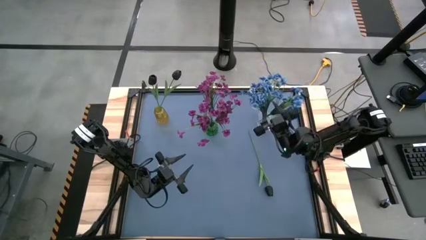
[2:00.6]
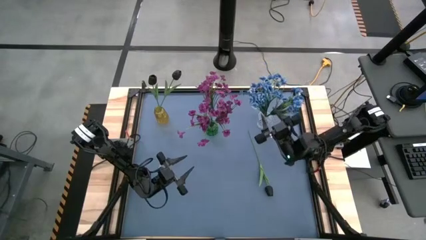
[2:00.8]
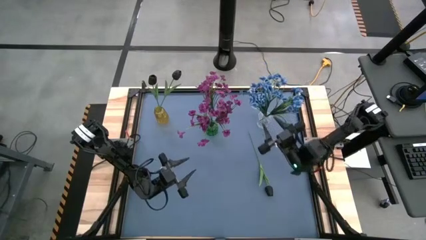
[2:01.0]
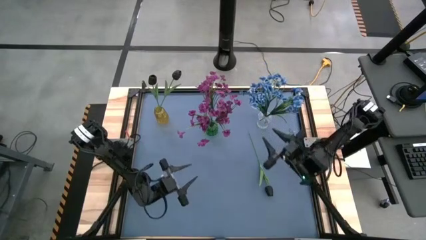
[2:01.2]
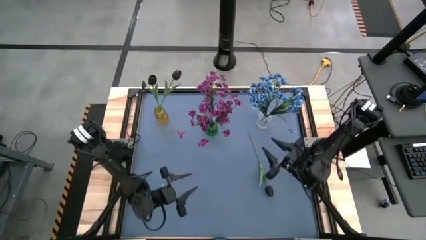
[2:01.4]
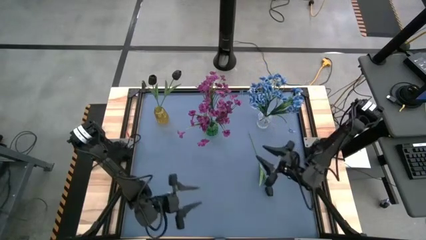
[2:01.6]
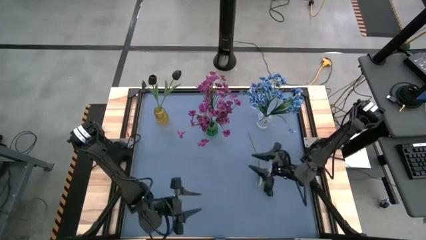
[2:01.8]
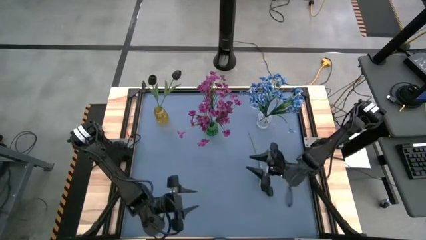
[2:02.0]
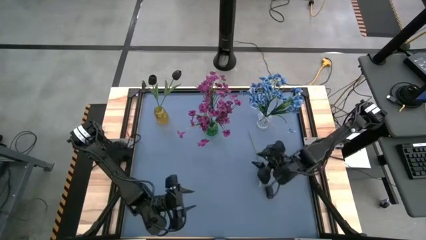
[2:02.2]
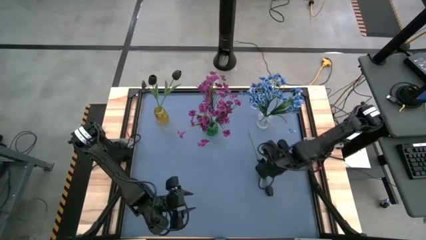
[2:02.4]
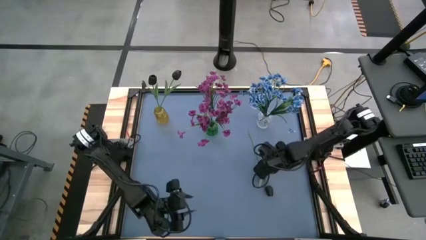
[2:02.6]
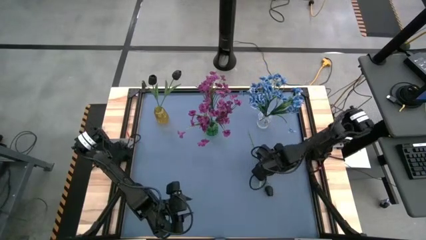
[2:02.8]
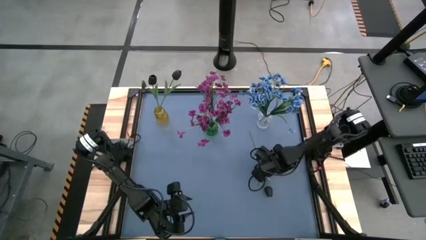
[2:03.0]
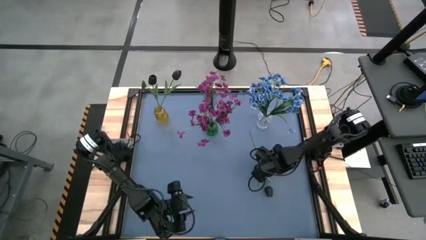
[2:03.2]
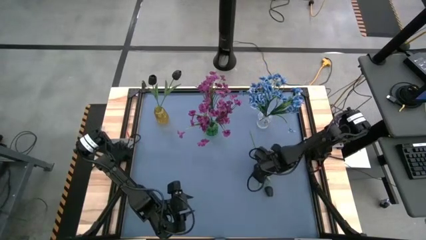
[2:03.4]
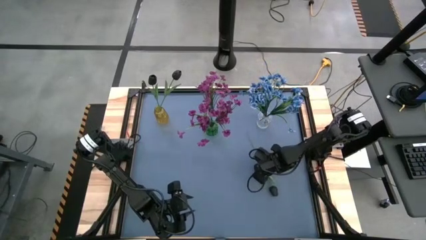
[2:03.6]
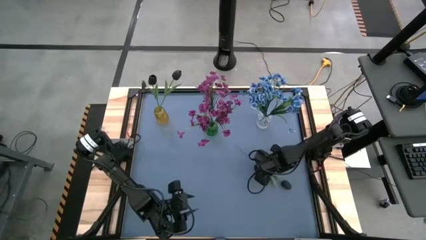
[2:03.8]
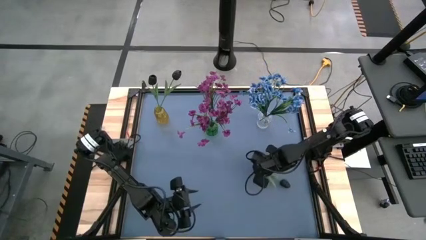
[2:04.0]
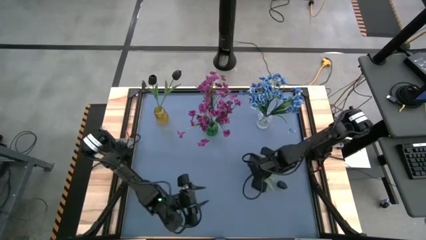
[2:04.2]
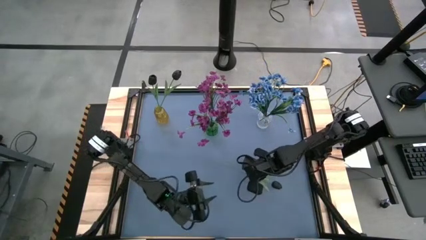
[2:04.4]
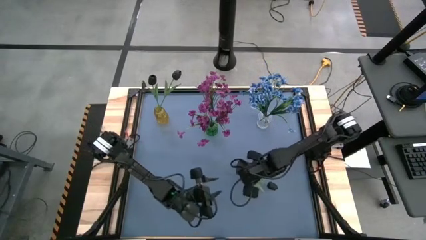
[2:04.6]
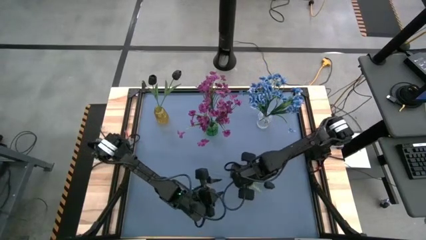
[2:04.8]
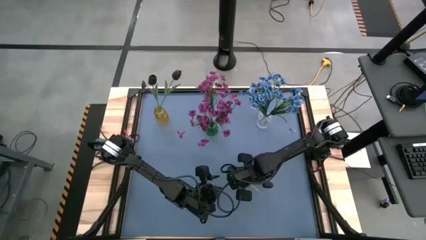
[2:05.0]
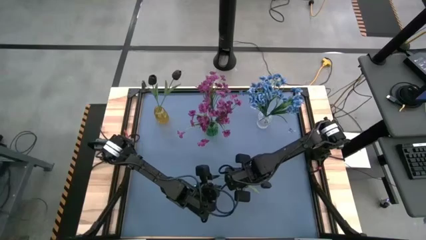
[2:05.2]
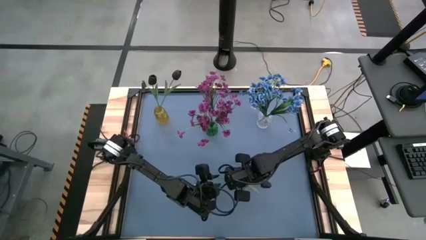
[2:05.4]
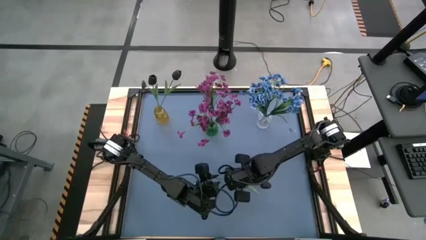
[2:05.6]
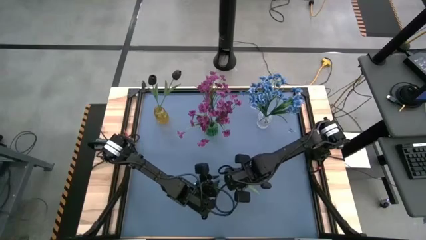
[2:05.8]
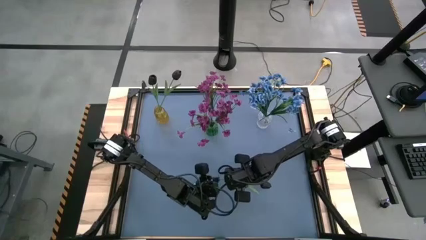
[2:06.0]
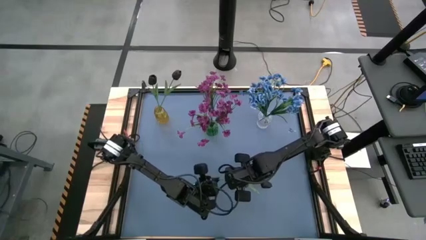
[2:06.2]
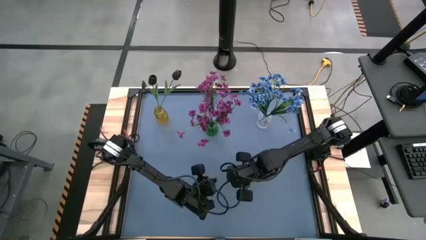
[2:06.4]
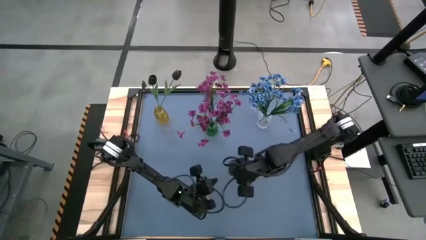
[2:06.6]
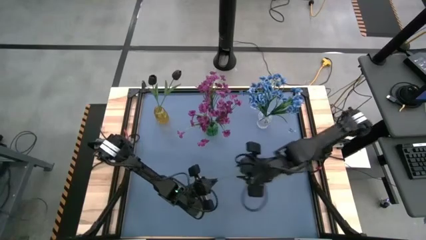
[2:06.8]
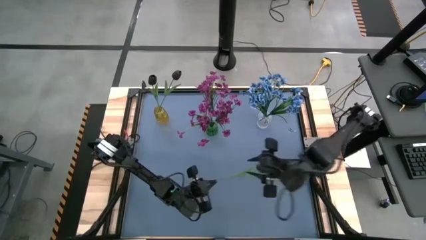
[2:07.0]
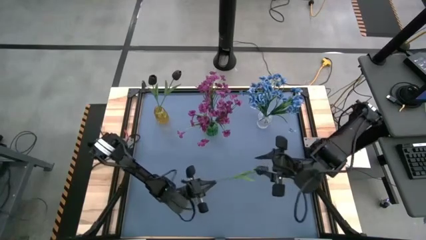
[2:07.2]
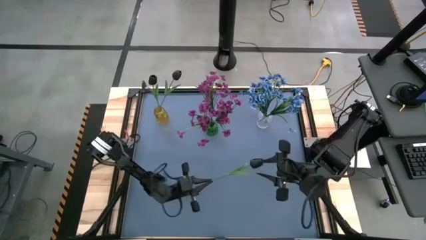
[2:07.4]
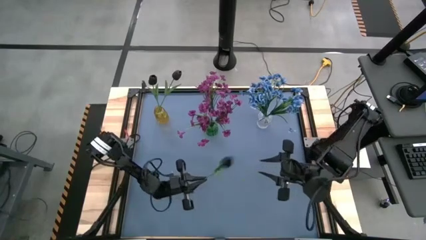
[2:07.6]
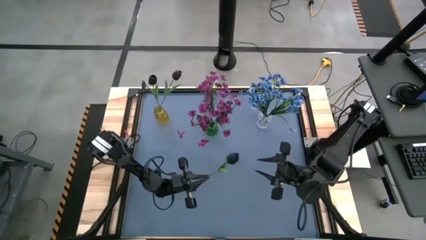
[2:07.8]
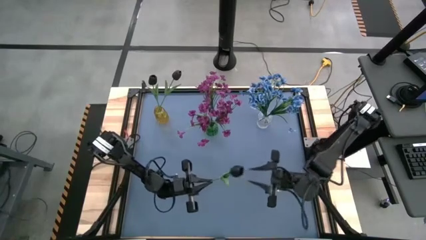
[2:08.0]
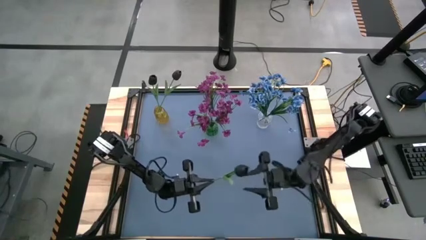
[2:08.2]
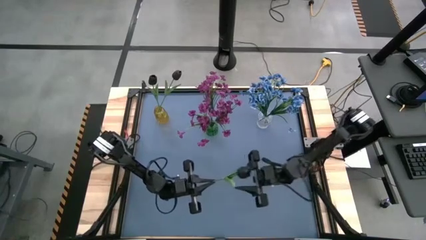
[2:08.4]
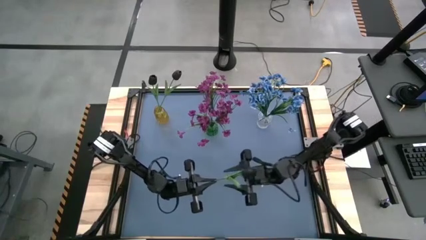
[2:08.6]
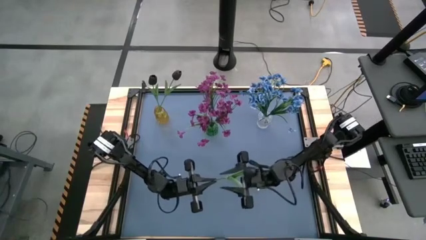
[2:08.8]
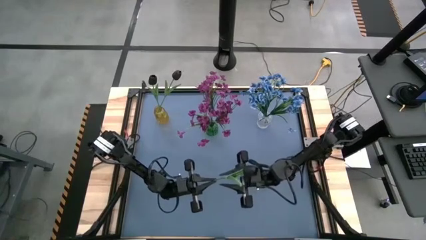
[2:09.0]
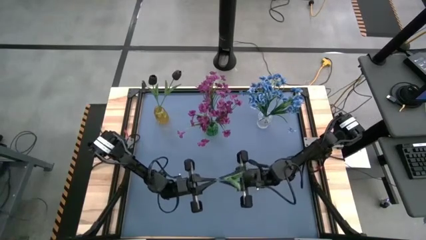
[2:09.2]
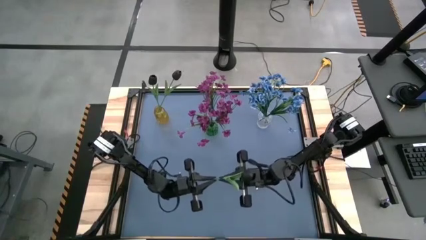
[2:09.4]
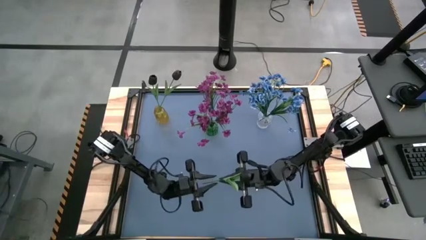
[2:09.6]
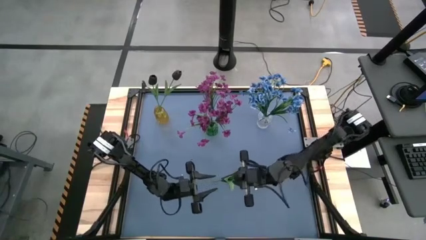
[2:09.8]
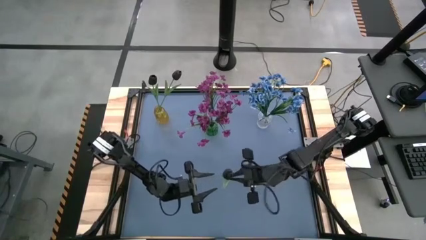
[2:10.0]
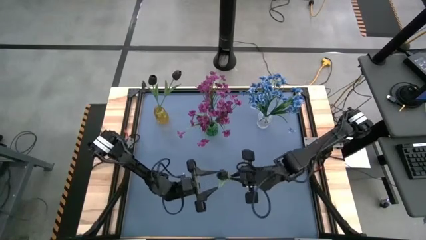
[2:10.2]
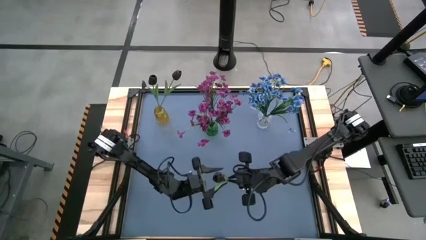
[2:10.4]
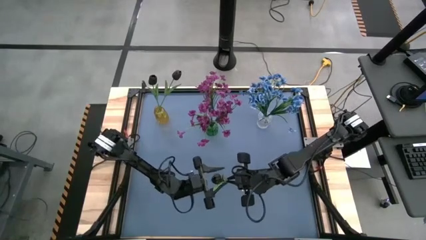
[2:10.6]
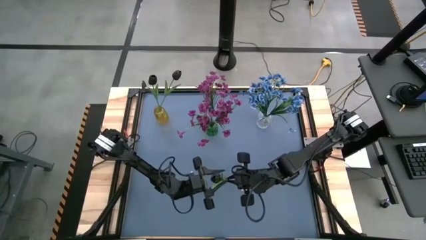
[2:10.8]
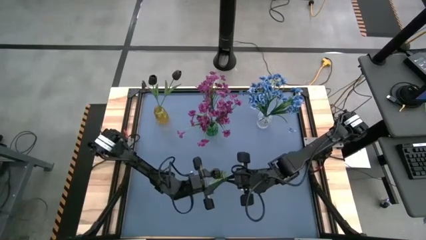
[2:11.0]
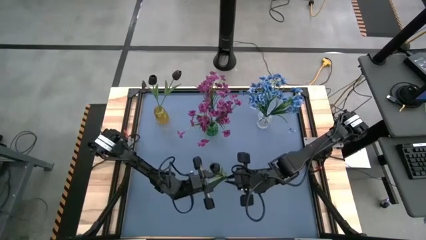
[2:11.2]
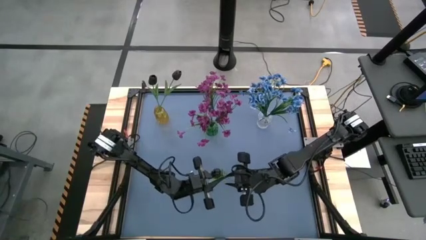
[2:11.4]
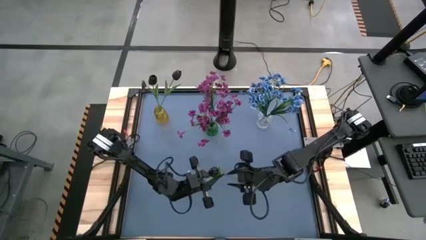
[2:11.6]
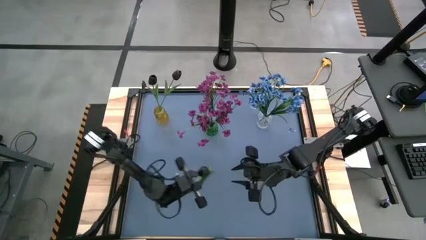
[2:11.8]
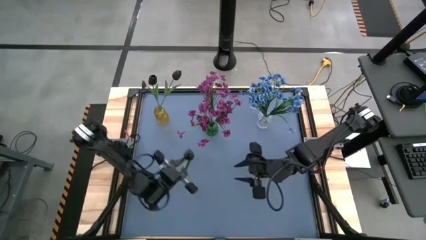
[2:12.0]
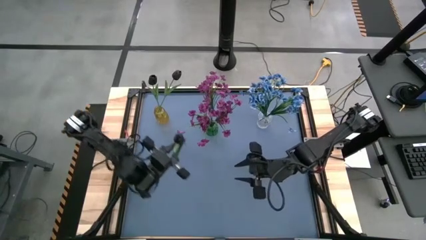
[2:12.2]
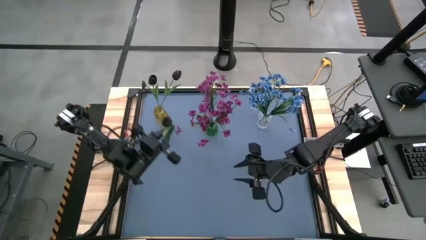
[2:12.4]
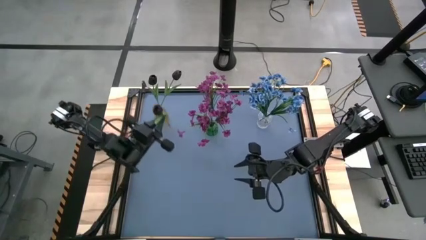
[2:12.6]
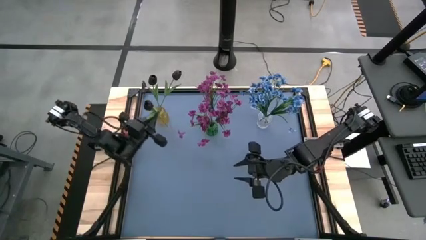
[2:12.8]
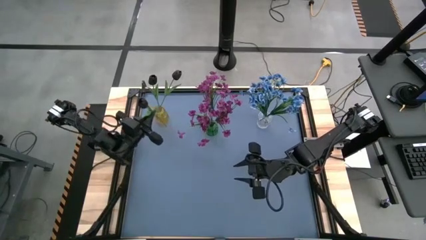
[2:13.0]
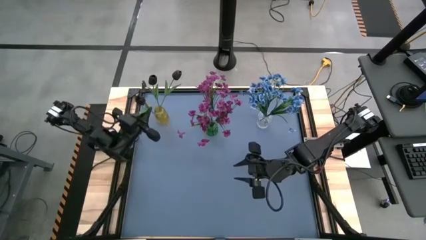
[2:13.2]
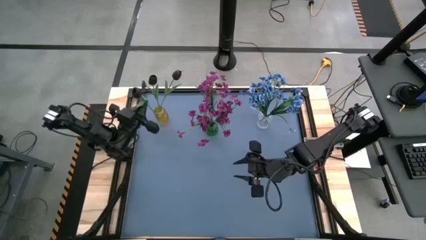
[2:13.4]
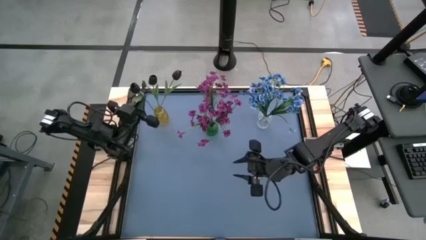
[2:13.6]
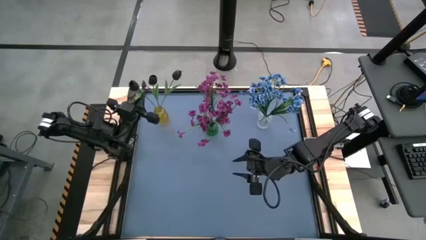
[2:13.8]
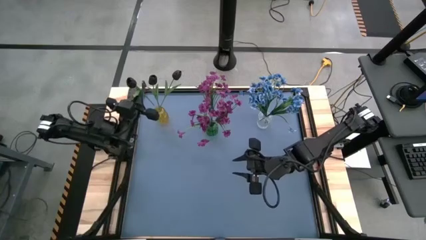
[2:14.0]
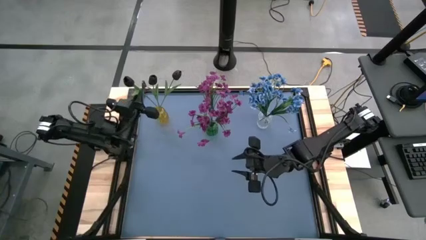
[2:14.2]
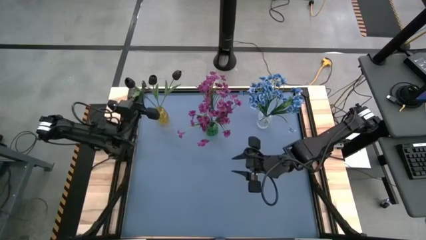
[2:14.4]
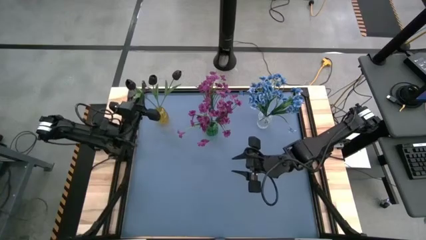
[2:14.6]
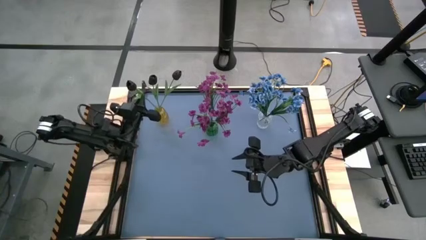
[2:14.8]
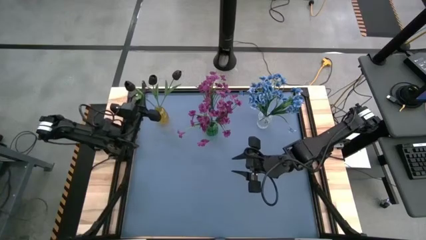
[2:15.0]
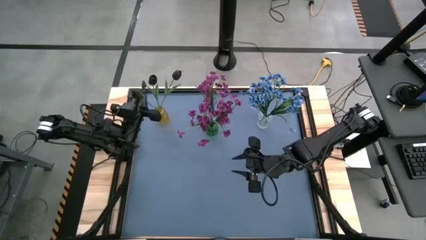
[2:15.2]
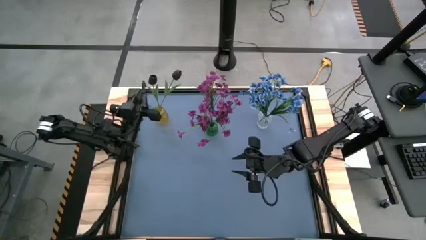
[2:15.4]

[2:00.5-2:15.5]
Task: Sort flowers into vase by color
Put the black tulip into the yellow vase
